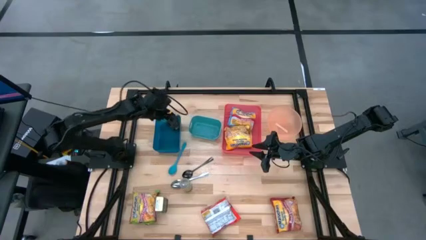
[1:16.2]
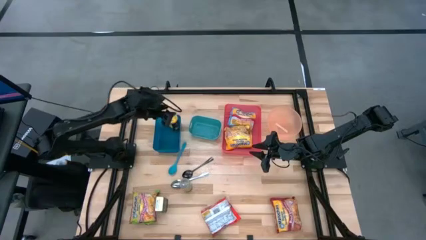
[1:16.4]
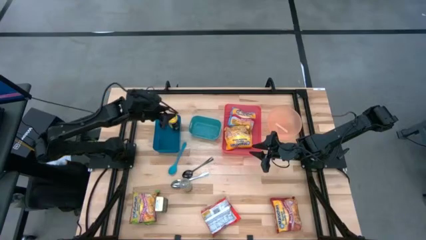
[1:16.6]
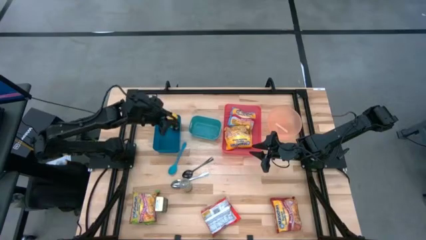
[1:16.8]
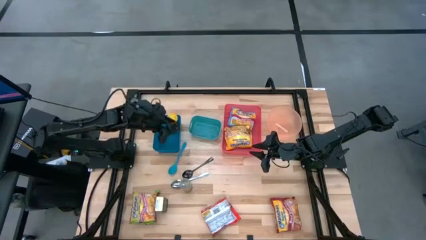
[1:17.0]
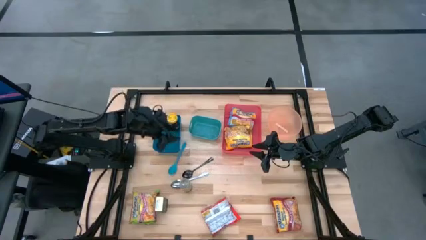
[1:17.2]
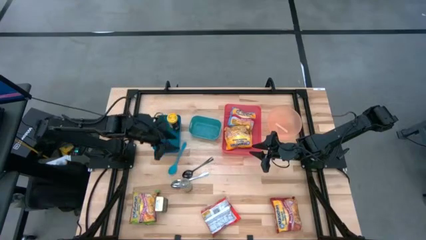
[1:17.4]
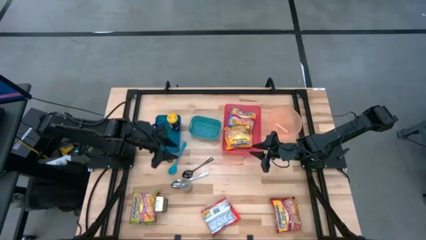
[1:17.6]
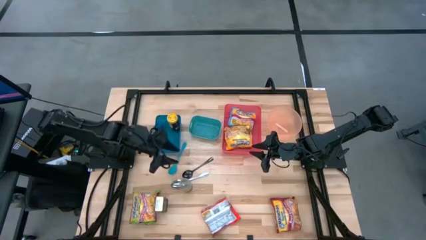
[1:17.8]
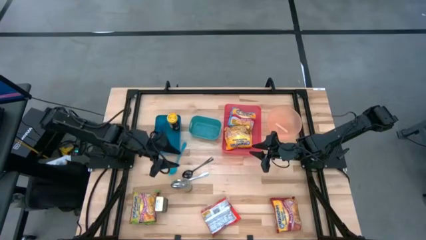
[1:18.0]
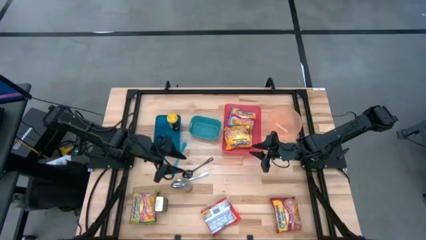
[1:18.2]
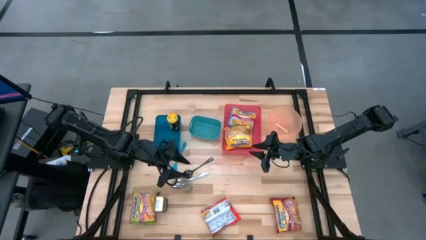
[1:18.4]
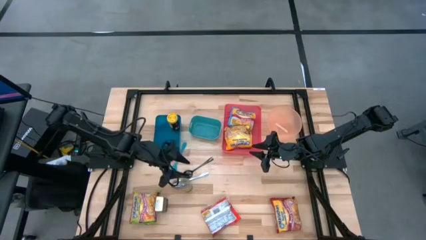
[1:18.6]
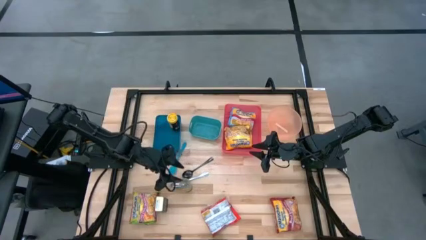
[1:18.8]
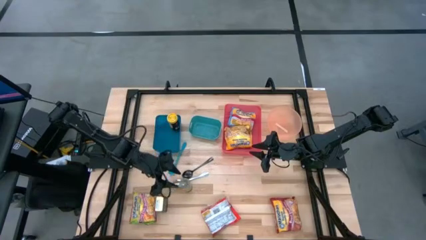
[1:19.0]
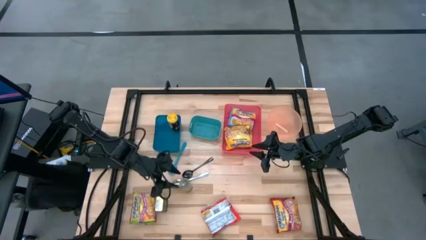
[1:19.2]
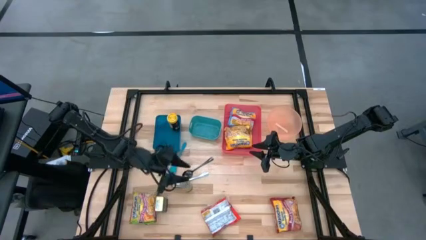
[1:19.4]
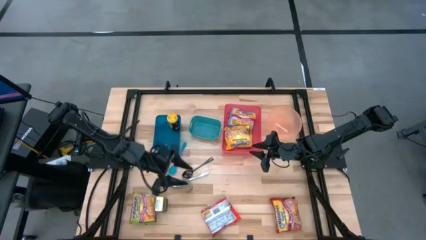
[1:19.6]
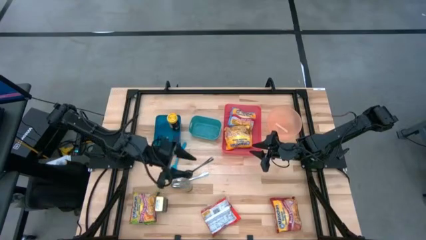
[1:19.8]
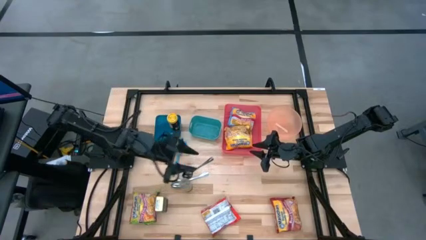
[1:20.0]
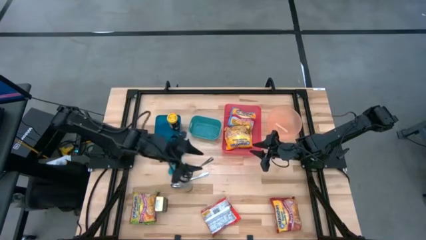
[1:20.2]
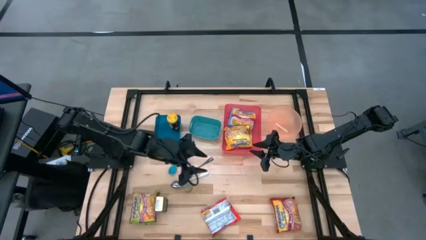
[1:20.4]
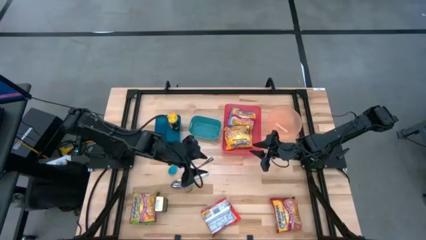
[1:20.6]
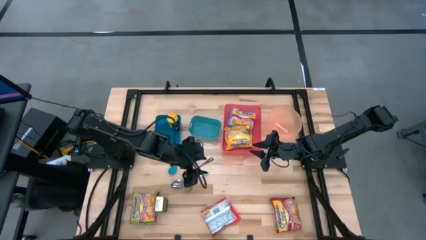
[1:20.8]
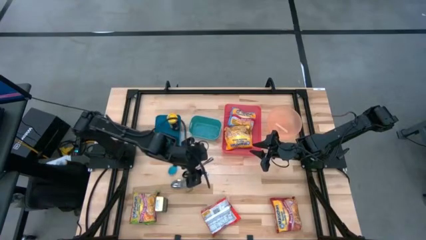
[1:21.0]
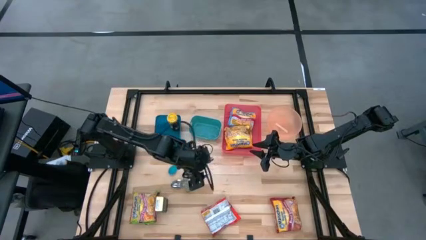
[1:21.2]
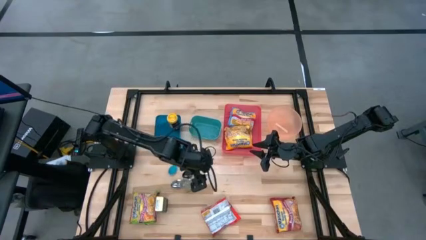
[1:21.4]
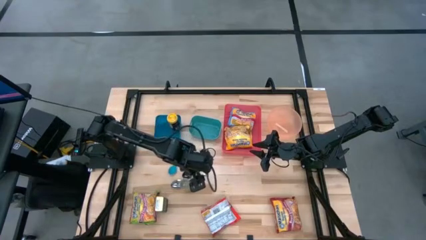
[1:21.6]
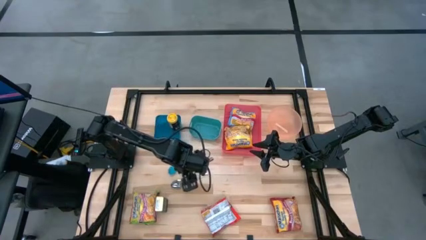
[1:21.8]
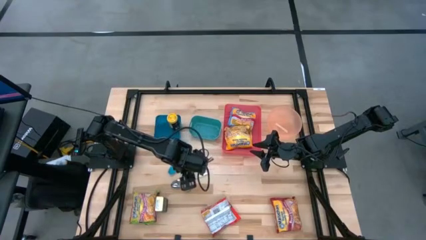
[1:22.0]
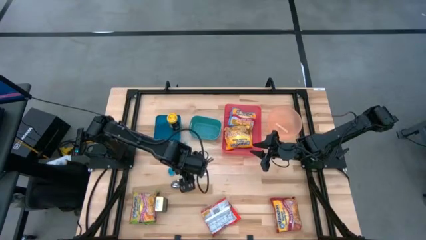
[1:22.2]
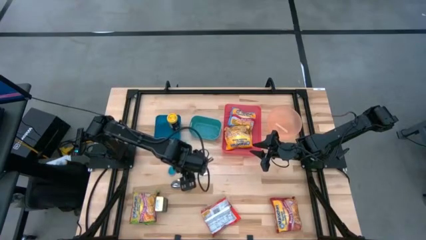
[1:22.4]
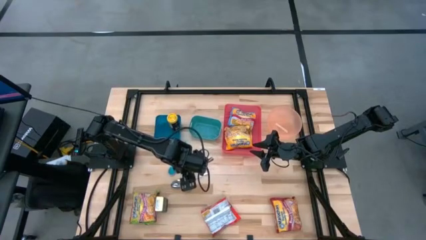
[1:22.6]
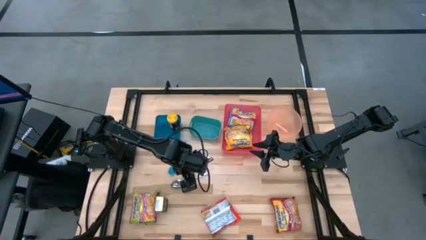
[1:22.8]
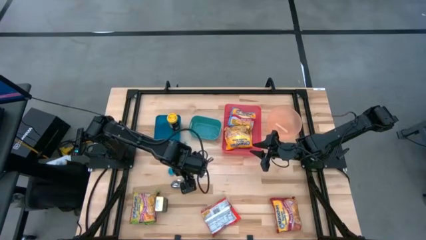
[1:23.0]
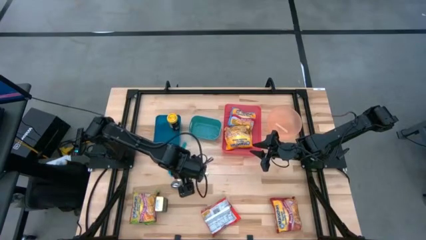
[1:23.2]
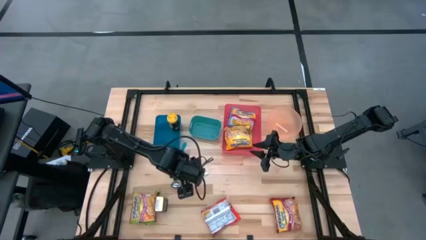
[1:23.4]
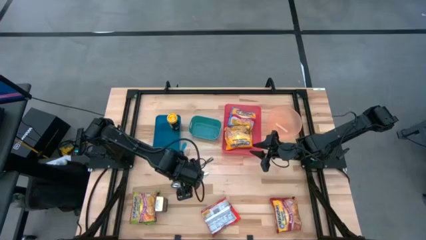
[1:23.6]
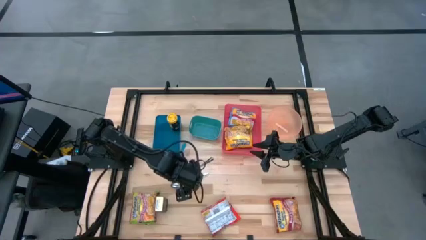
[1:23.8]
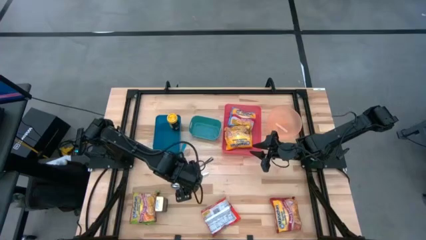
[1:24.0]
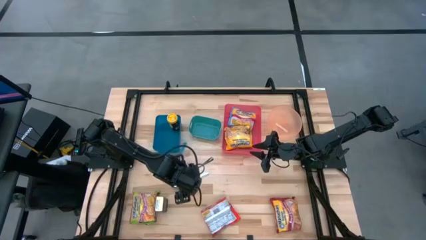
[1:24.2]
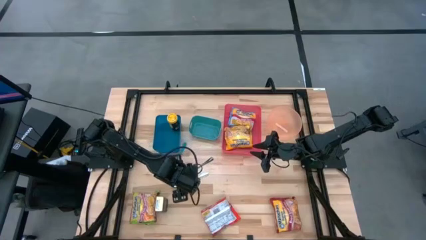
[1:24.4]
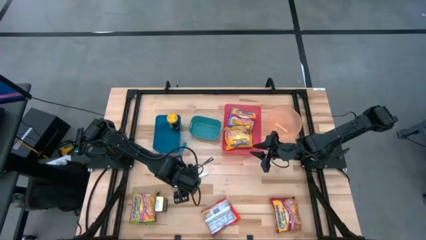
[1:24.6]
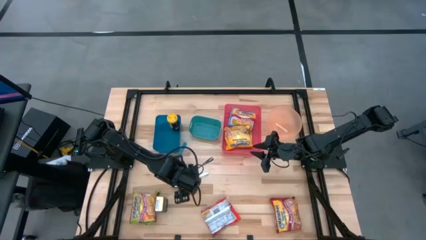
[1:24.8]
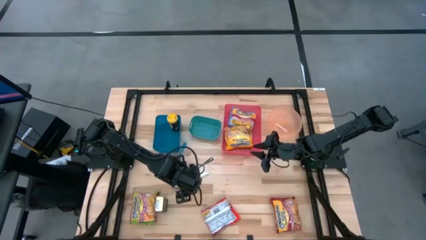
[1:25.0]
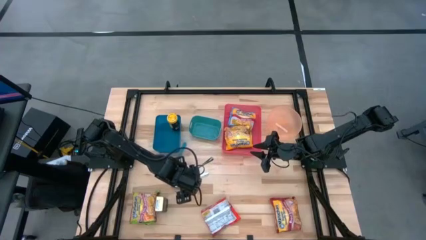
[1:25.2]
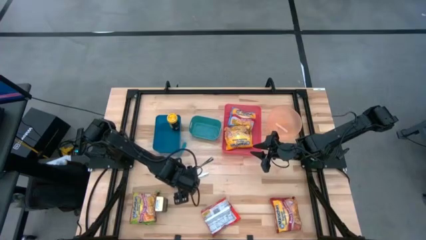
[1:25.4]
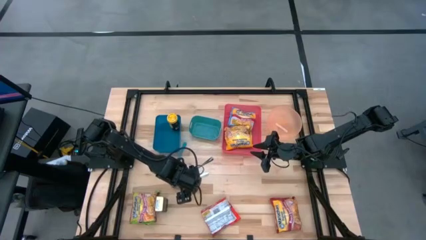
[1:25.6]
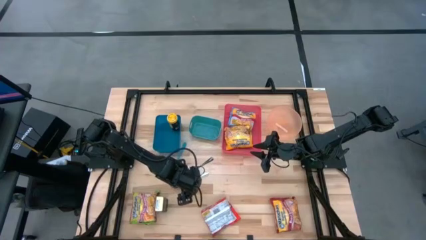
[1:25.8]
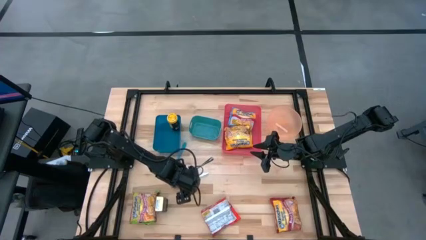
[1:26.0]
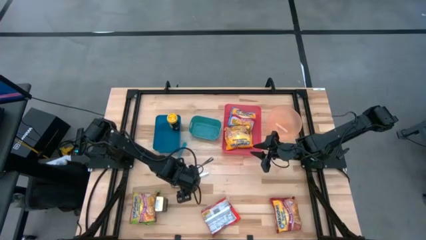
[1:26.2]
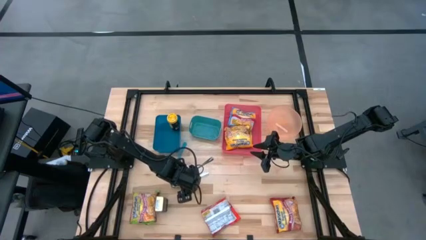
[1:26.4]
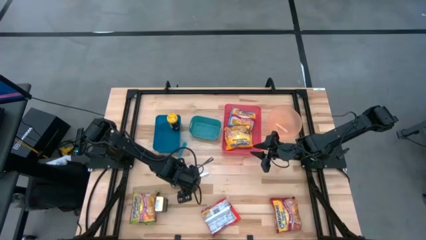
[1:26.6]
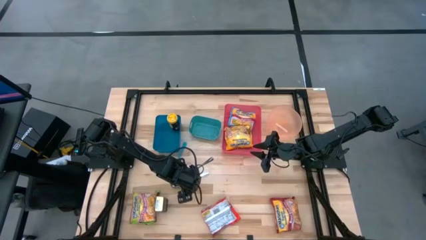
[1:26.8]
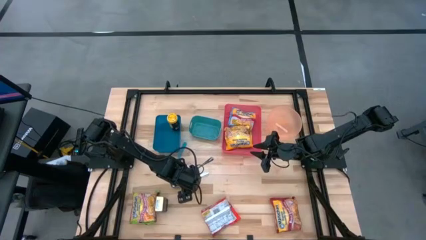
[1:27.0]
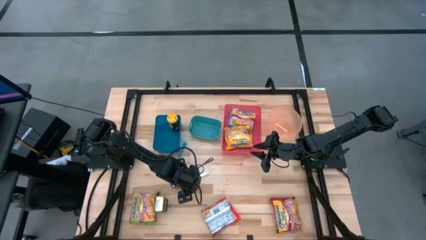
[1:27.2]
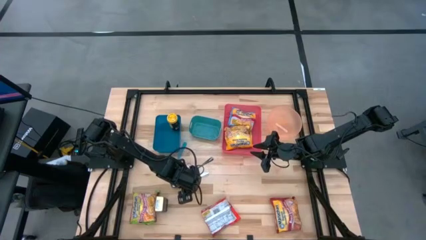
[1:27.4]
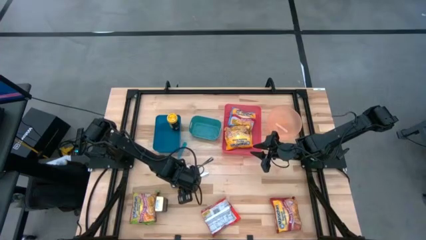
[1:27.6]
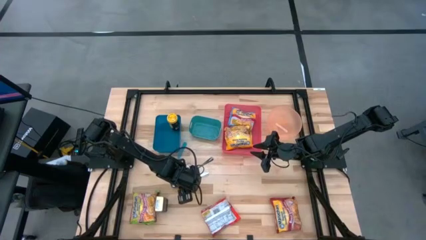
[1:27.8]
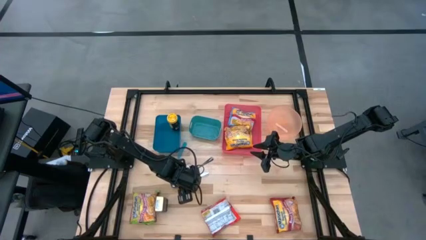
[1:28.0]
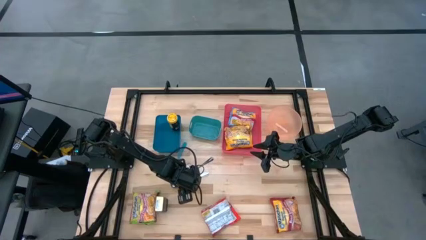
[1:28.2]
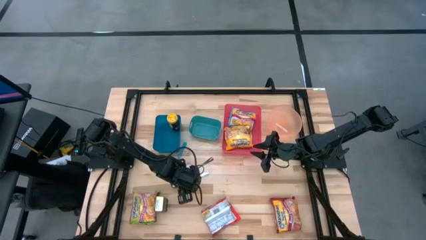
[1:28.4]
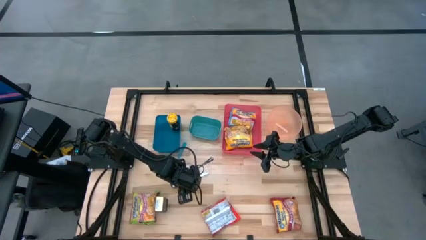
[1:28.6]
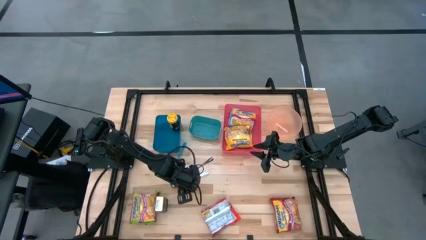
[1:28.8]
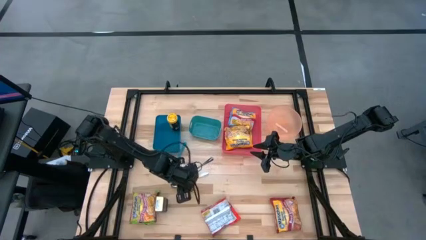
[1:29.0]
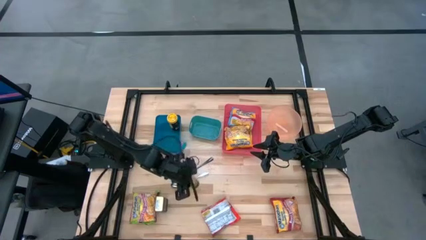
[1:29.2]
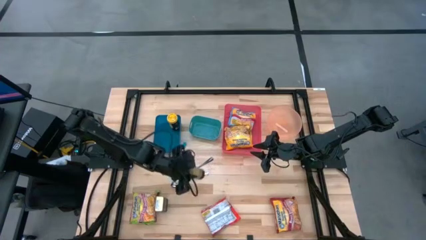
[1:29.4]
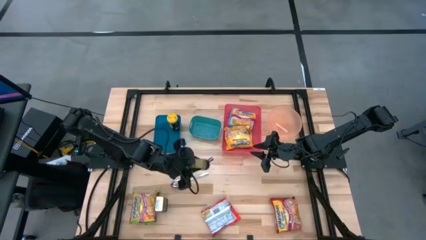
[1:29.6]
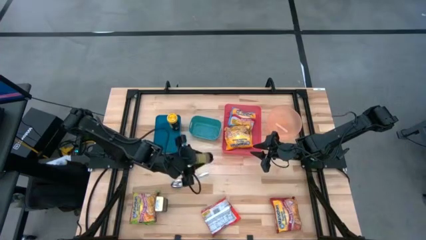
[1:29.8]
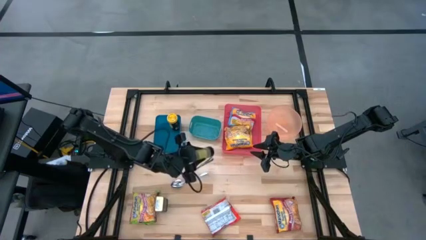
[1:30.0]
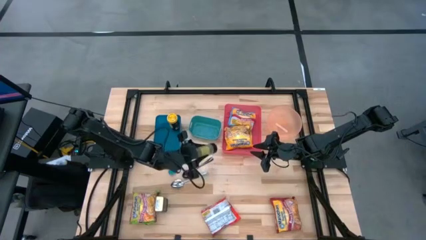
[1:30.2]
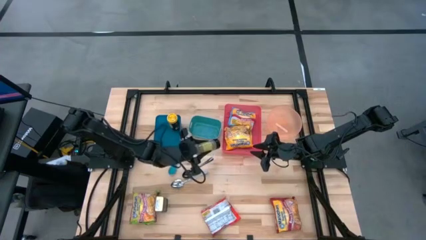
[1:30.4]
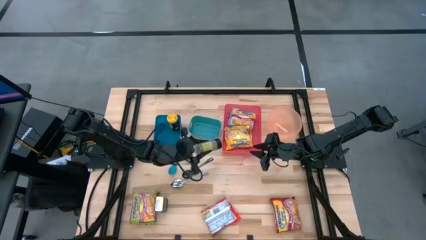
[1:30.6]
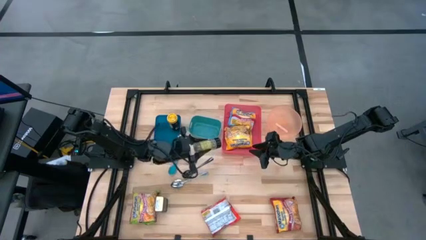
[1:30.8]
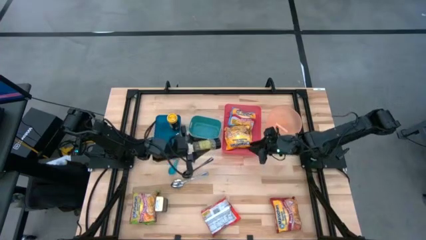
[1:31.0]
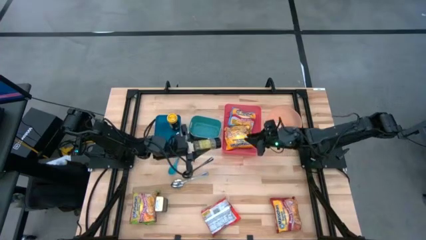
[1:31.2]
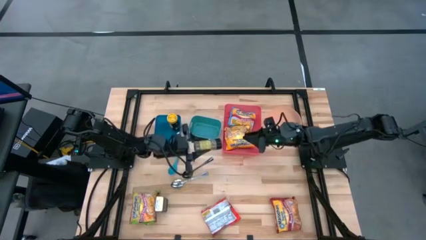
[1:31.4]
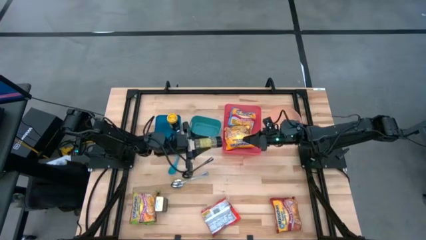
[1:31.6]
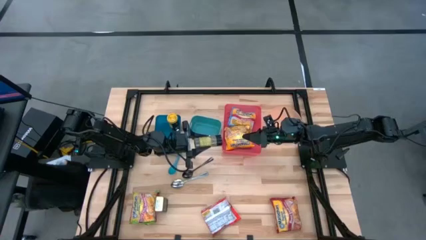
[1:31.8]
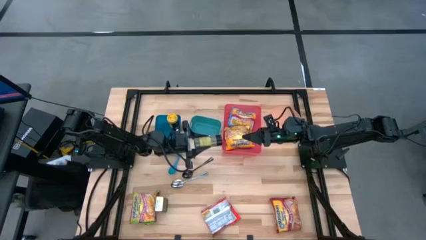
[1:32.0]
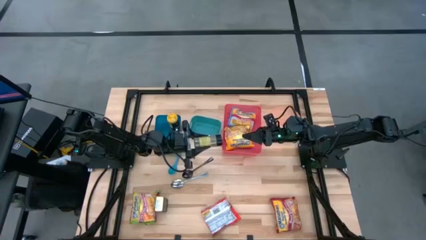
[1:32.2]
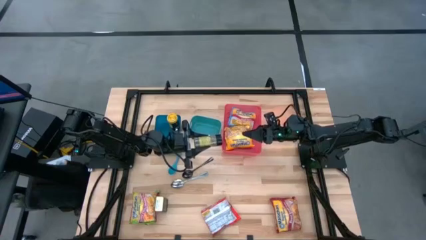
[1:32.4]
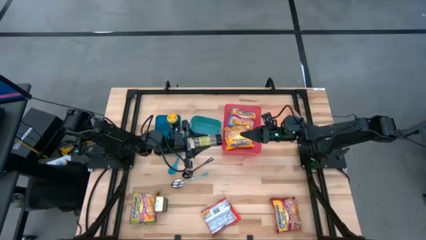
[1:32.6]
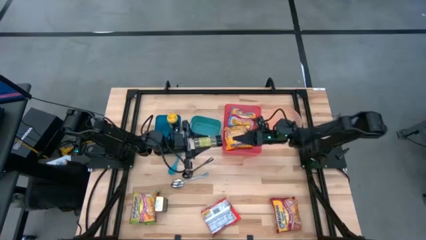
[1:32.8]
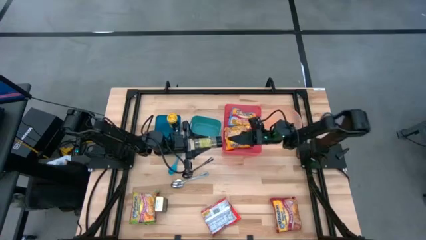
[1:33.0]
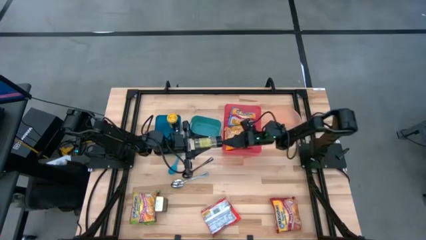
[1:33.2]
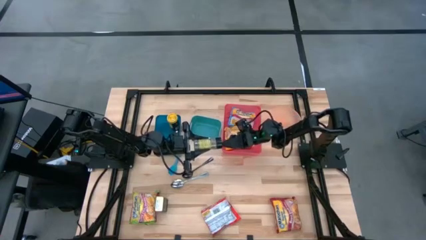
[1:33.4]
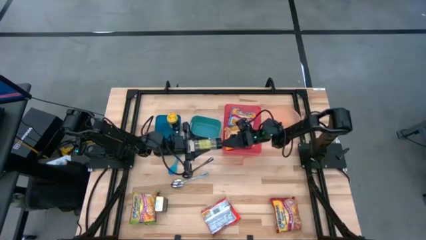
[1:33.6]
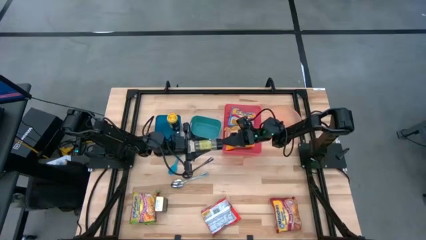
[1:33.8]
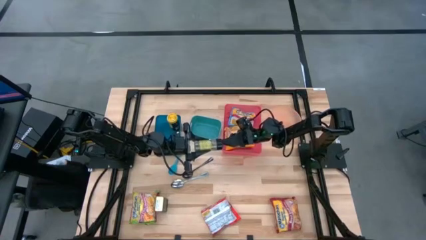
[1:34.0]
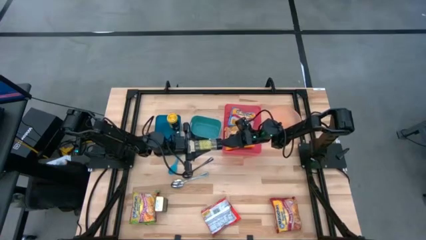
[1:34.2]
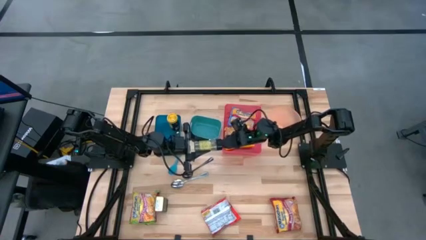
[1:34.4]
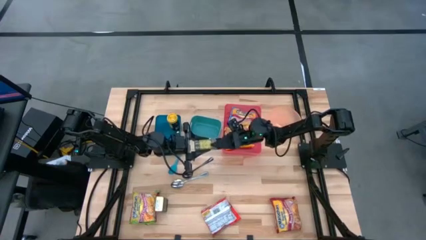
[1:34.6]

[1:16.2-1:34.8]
Task: Pick & Place Food Item
Put the green seasoning bottle into the blue bin
